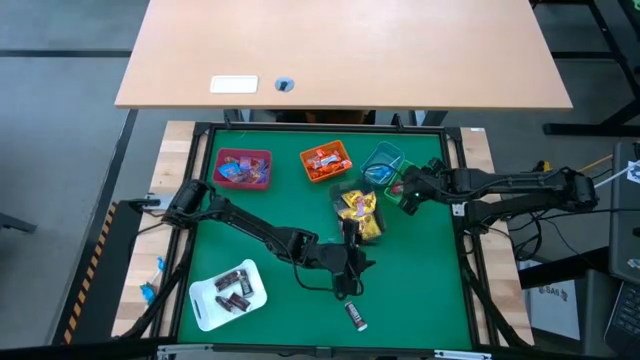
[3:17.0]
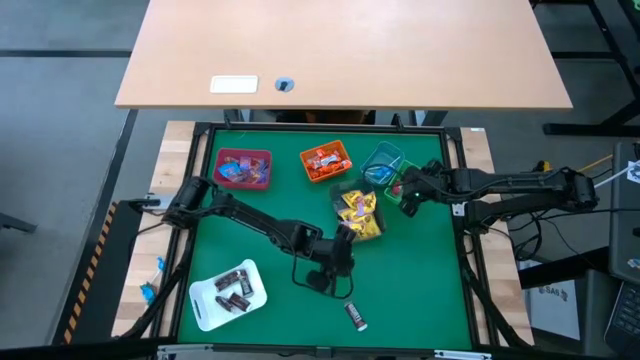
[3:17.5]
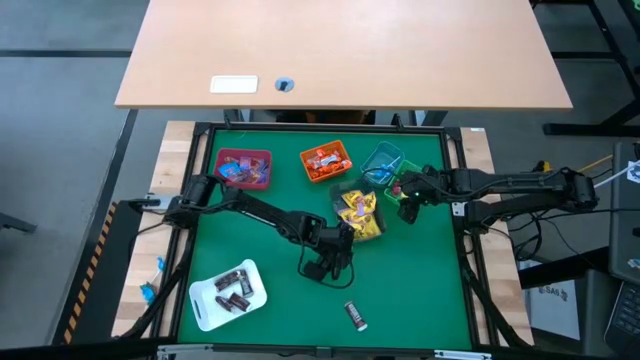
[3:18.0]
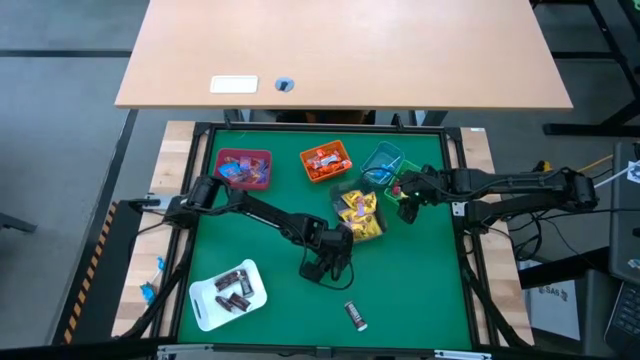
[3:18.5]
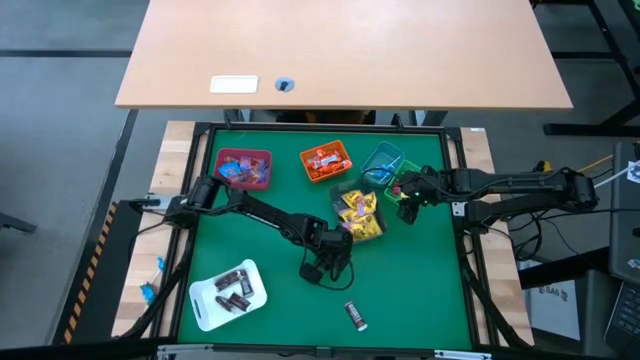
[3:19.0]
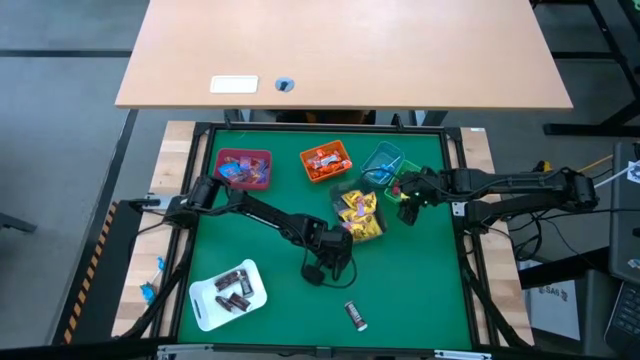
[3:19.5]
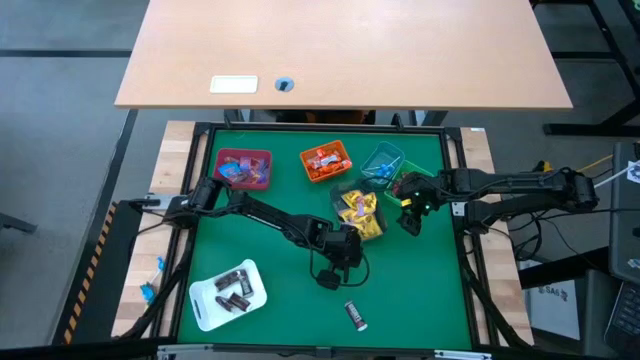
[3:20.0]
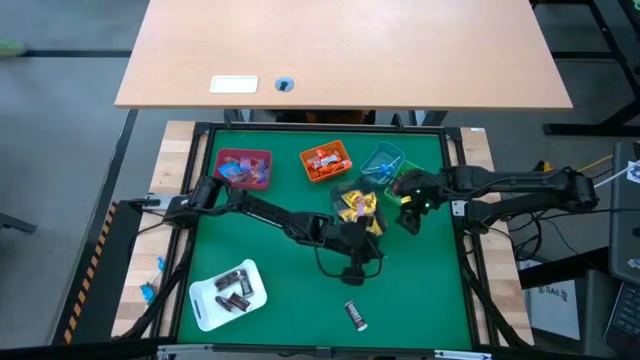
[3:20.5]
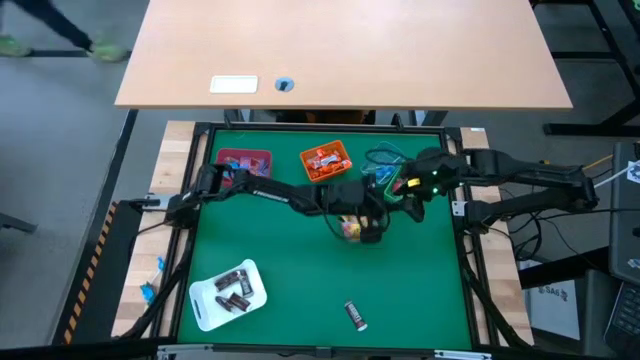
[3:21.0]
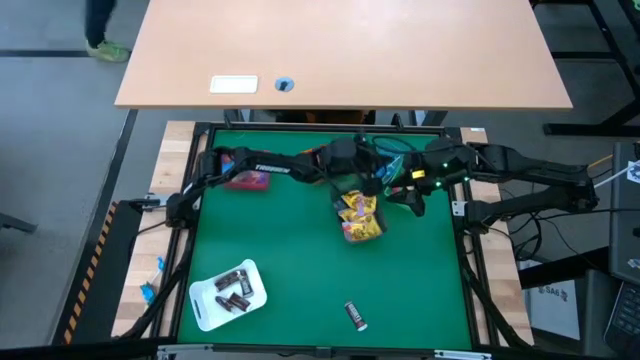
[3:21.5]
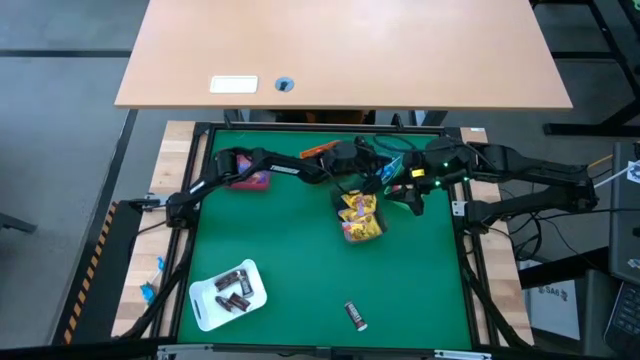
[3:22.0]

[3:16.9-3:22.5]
Task: Sort candy
Put the blue lollipop into the blue bin

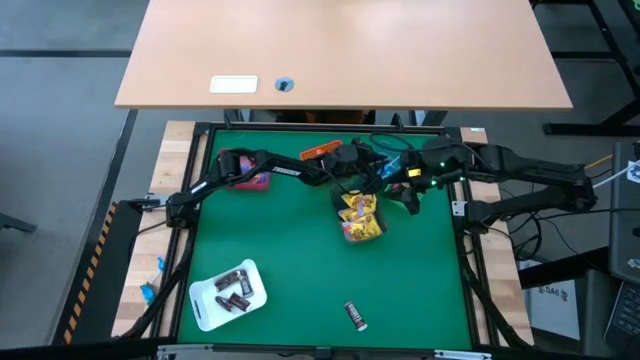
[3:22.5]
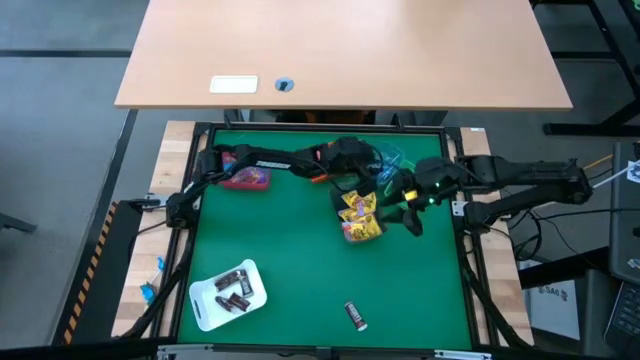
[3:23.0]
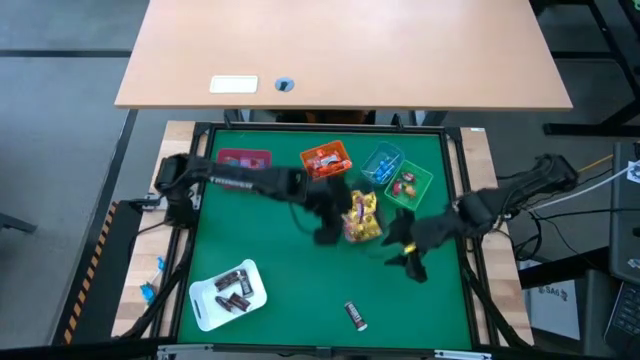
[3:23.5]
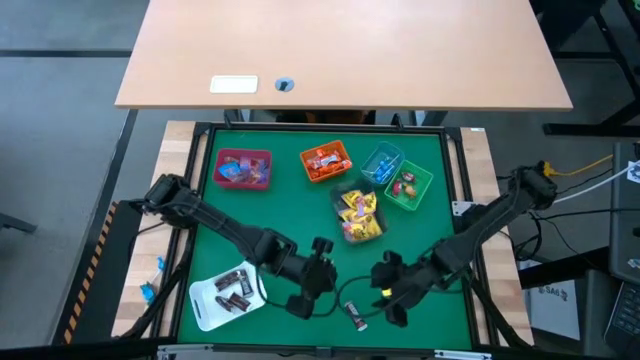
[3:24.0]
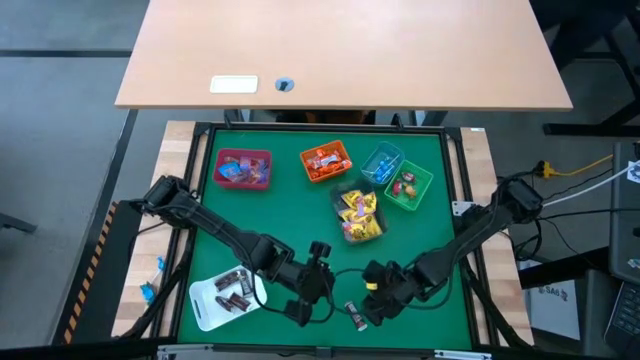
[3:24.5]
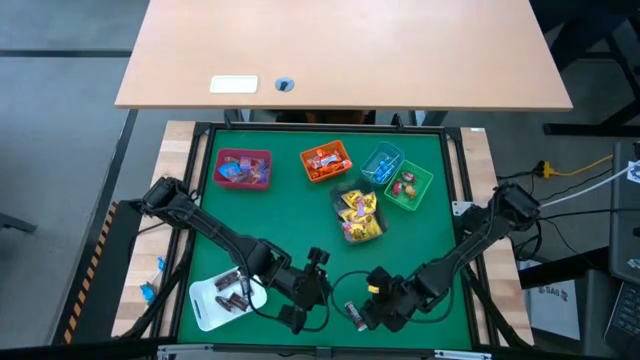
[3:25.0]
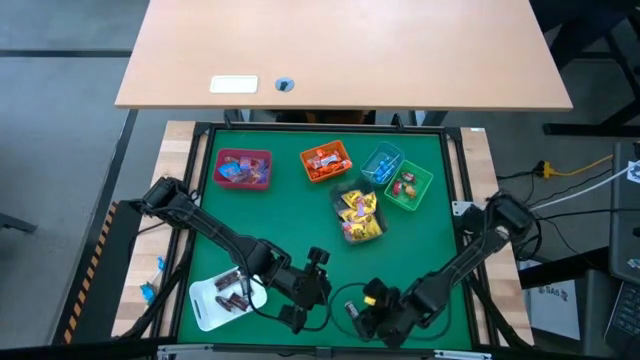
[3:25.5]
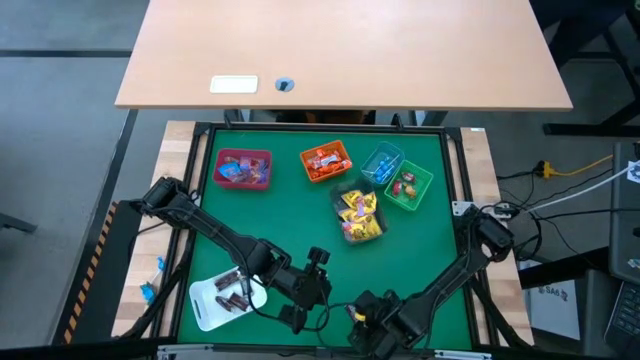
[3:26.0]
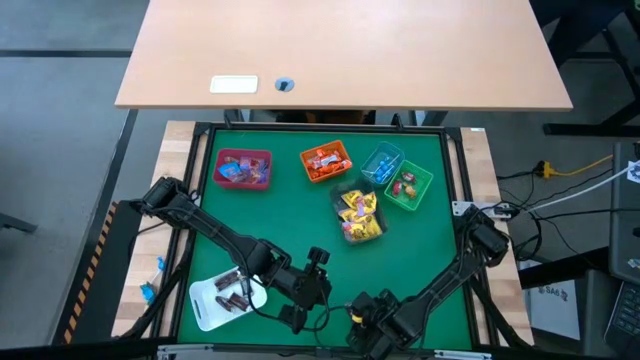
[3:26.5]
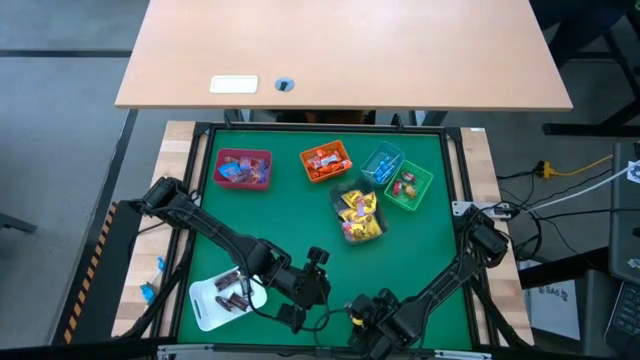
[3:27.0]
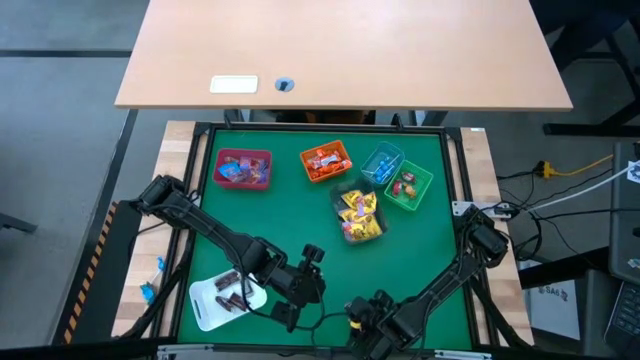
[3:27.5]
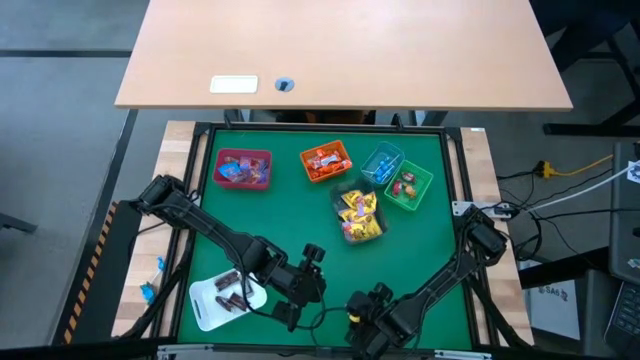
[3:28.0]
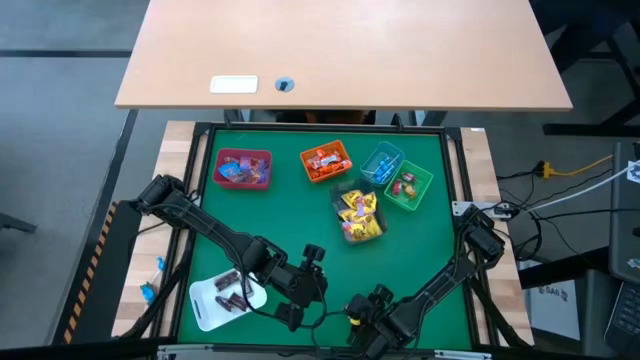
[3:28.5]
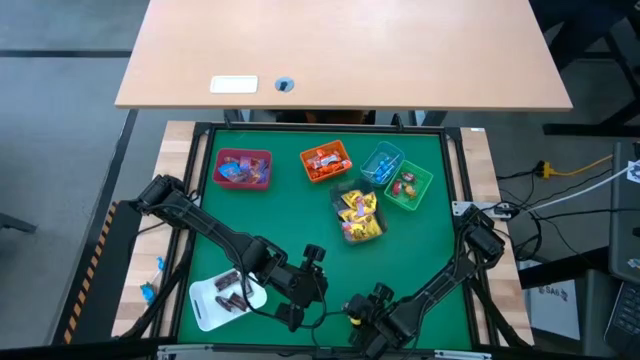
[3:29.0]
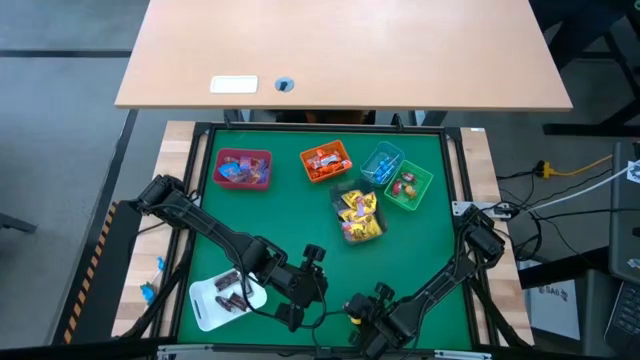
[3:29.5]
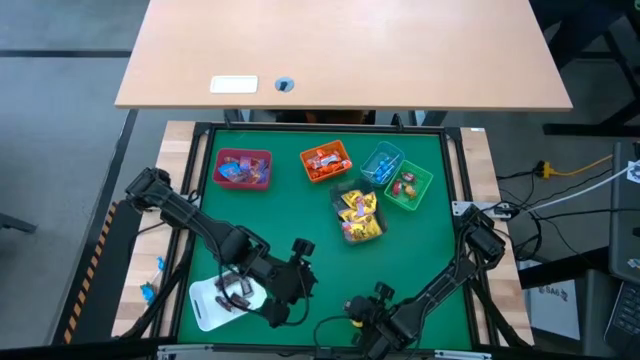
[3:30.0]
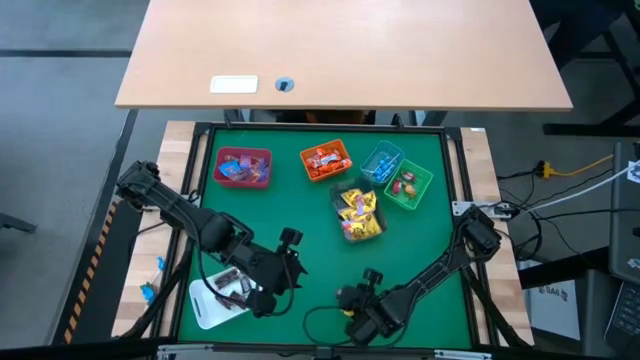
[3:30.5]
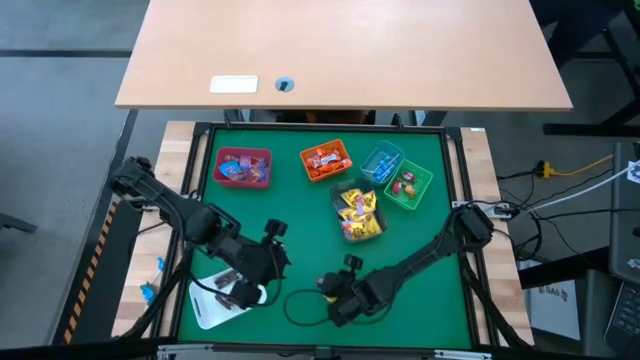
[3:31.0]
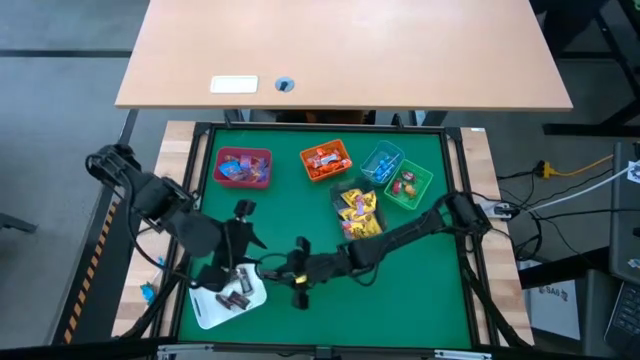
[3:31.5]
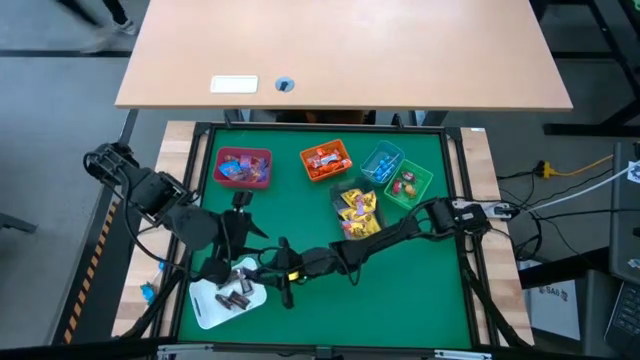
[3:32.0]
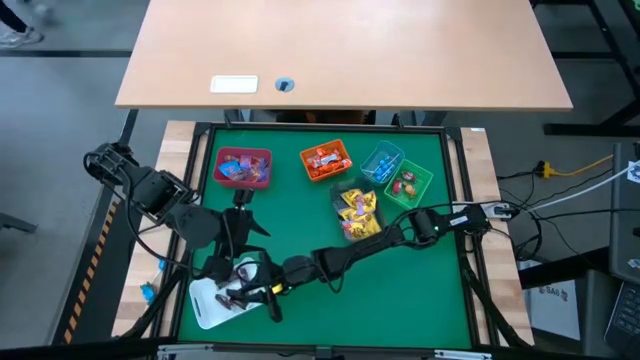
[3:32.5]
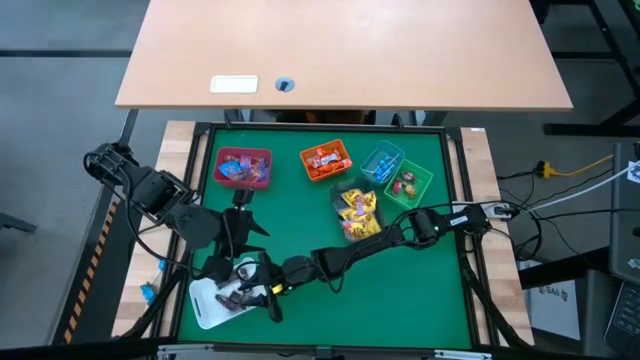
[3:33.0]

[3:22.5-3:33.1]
Put the brown chocolate into the white bin

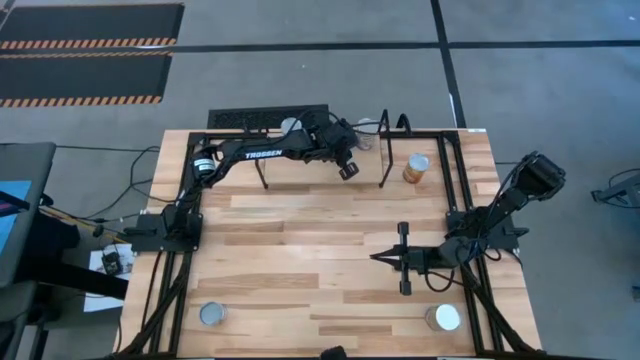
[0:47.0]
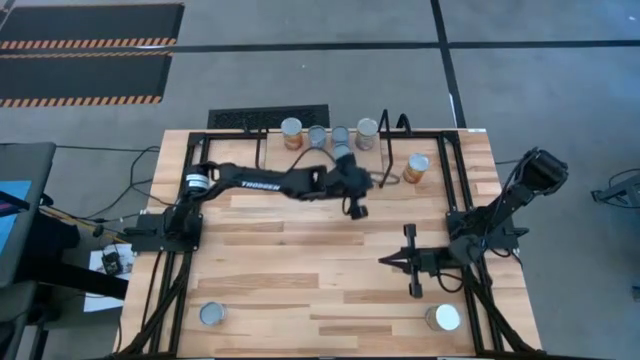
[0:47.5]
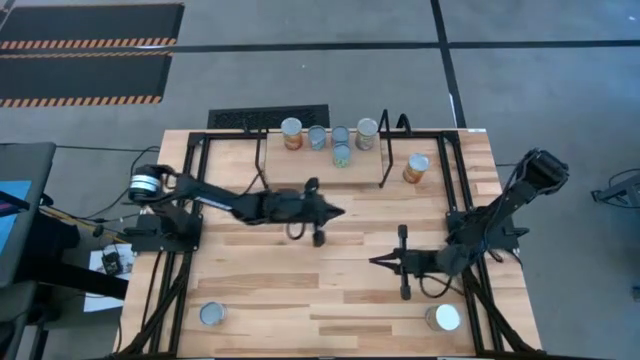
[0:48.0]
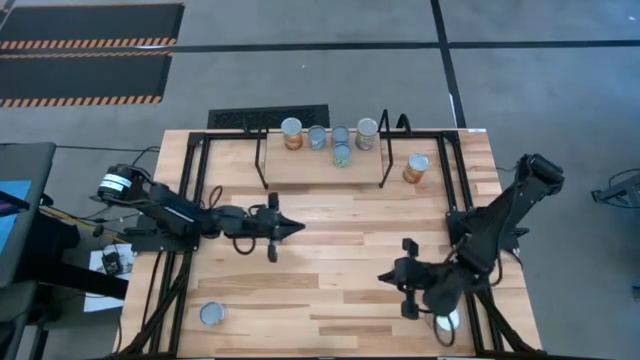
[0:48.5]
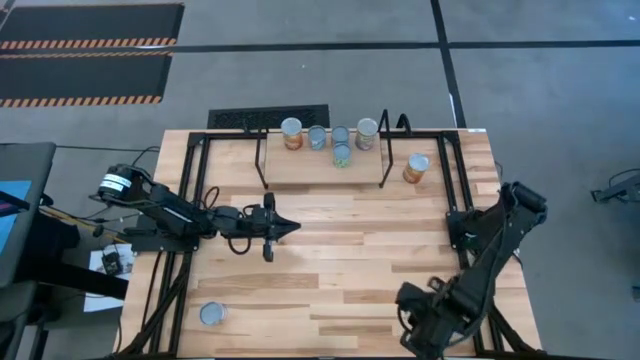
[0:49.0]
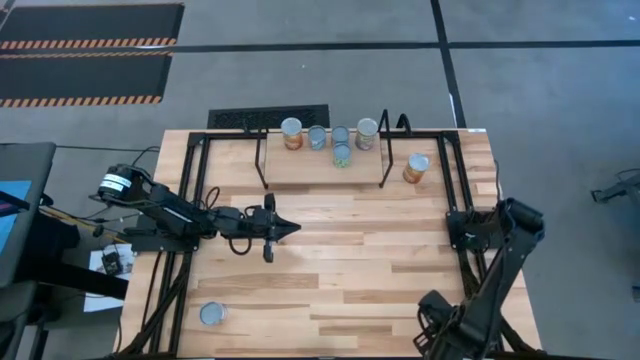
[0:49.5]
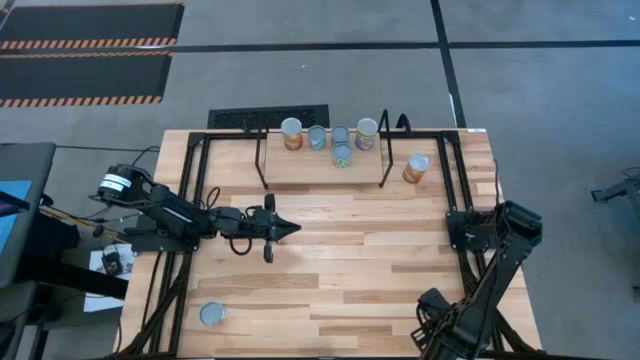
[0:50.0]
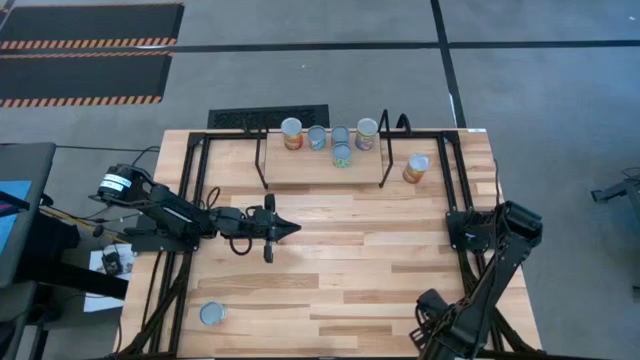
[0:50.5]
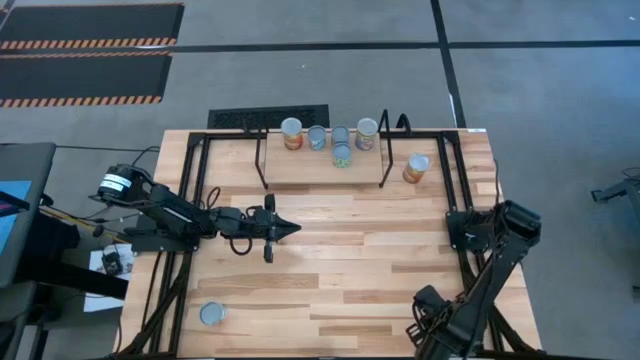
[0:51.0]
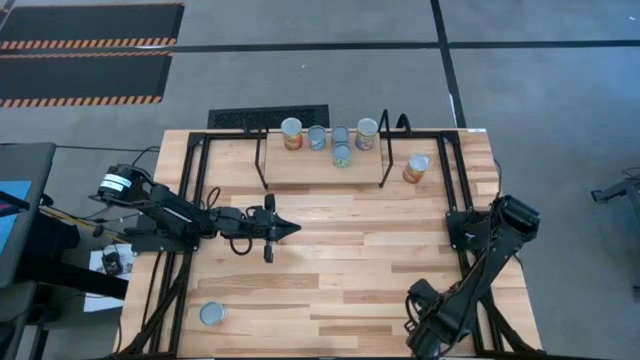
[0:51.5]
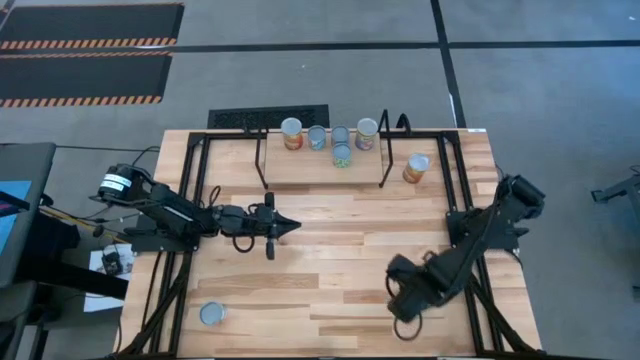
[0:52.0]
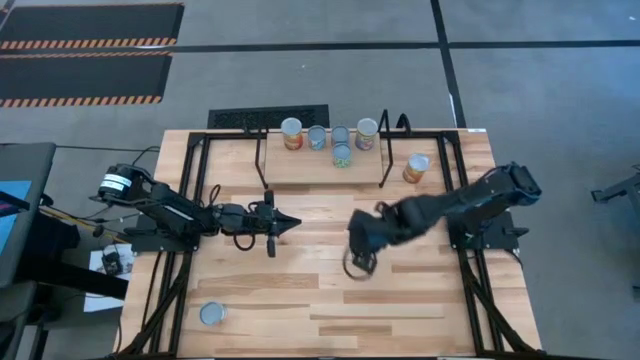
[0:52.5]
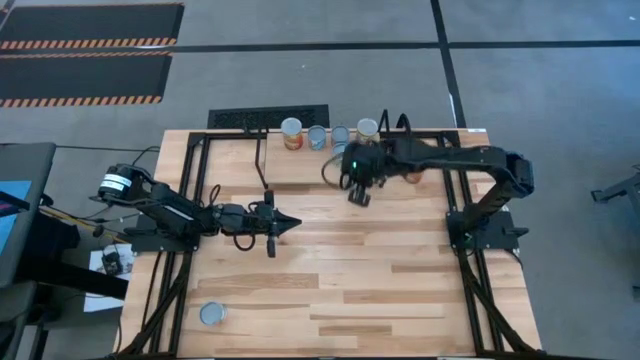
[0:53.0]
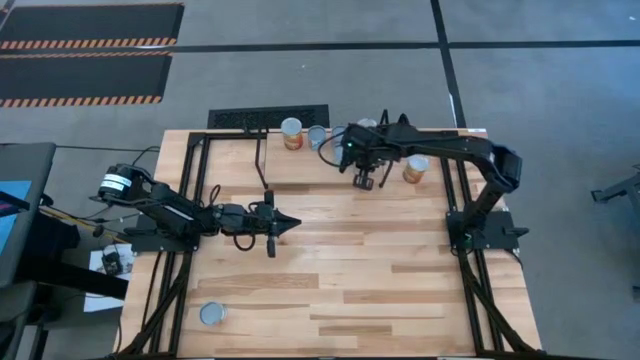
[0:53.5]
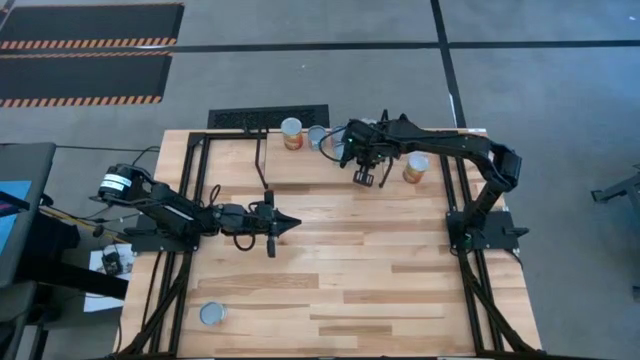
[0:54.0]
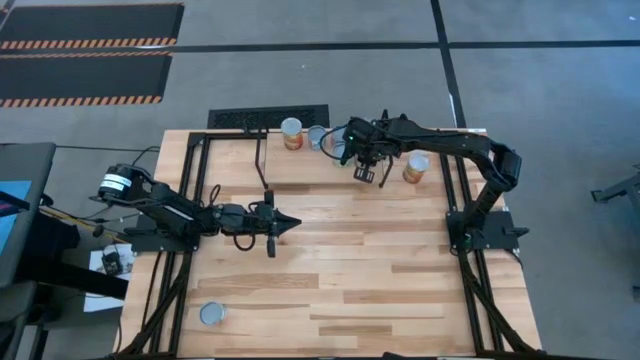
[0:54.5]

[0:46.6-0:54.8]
Task: Pick and place cans onto a shelf
Put the canned peaches on the shelf
